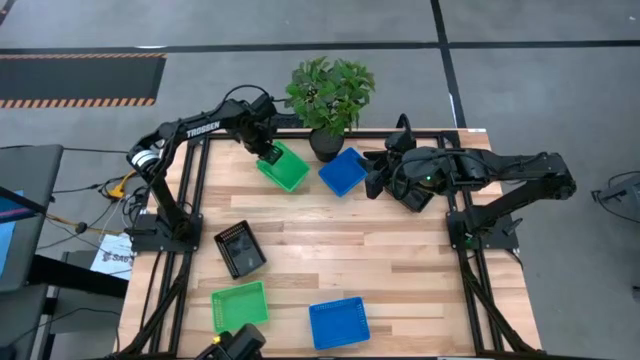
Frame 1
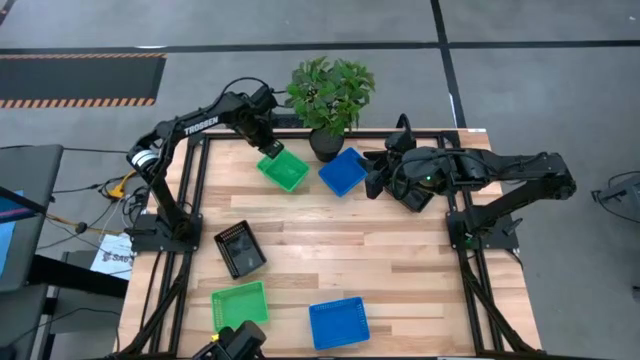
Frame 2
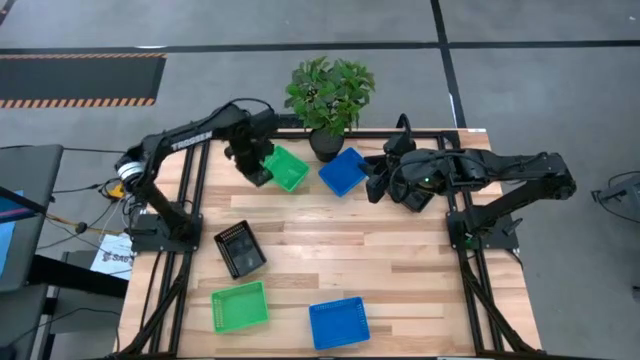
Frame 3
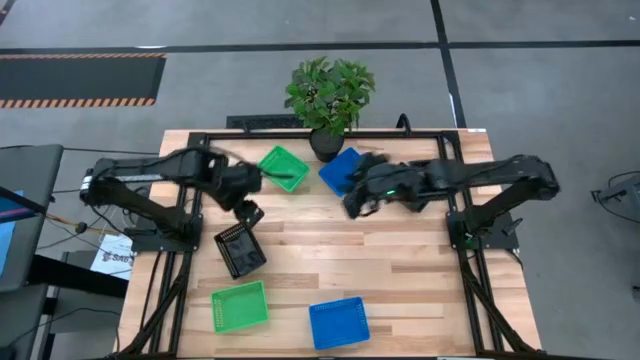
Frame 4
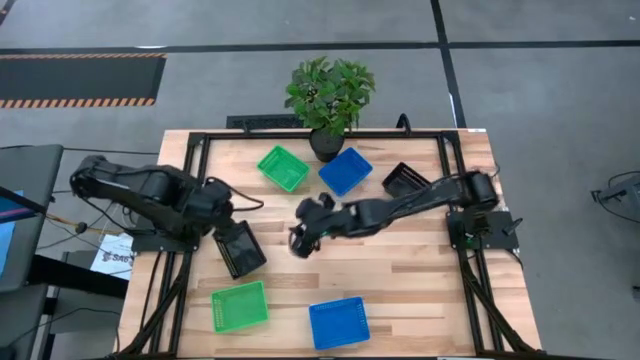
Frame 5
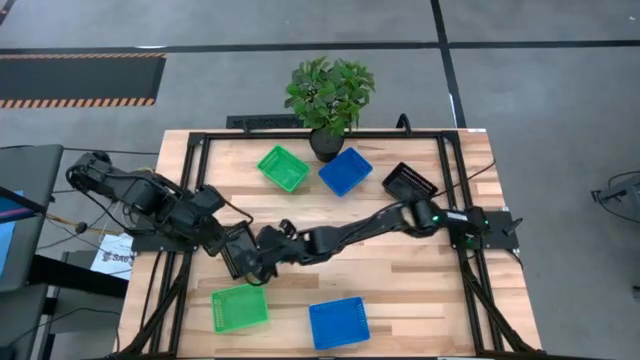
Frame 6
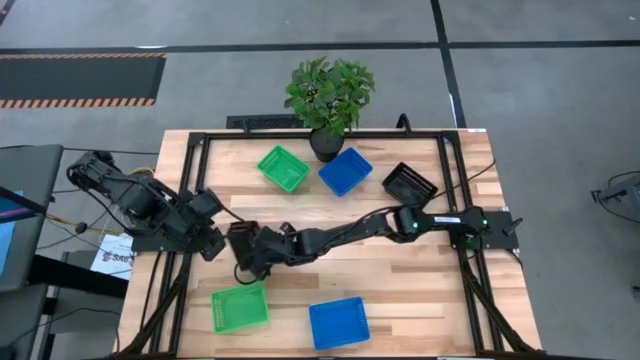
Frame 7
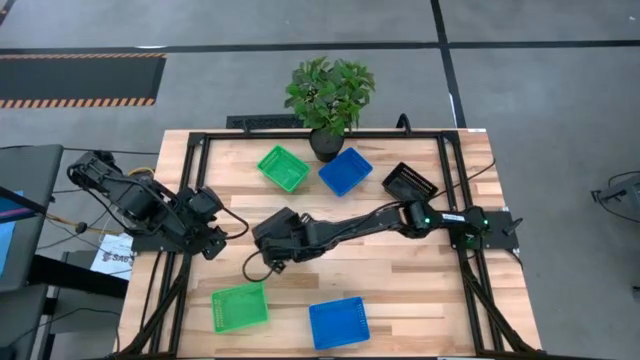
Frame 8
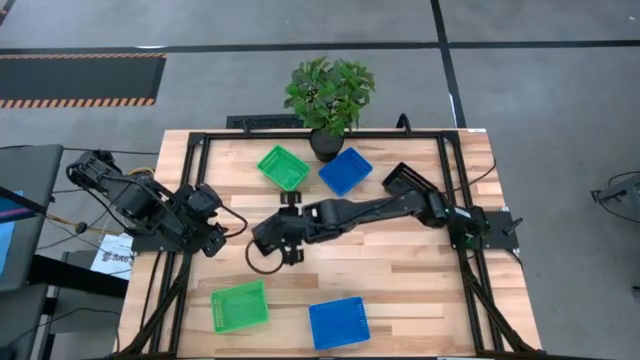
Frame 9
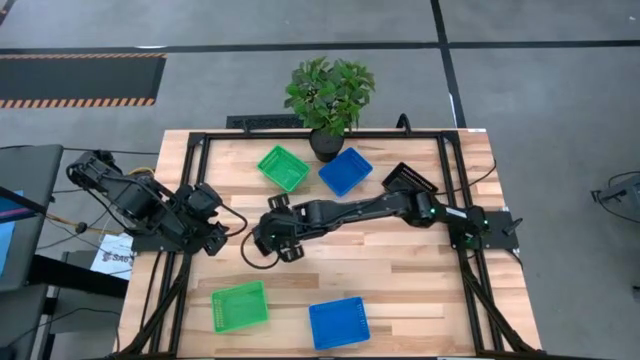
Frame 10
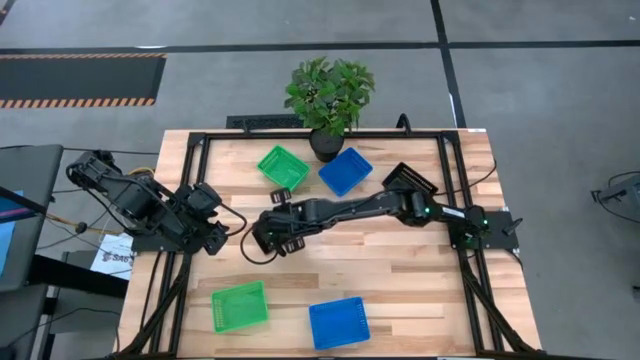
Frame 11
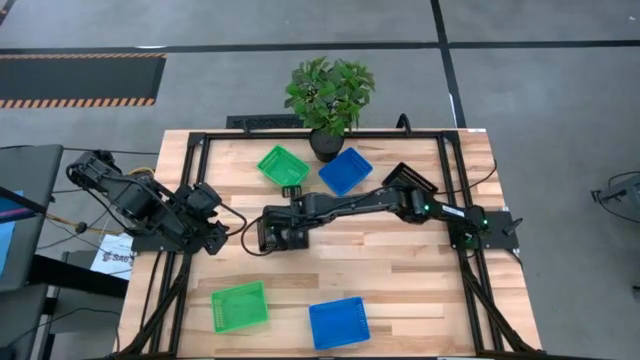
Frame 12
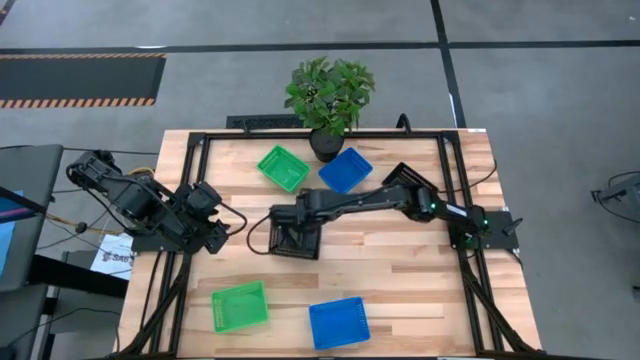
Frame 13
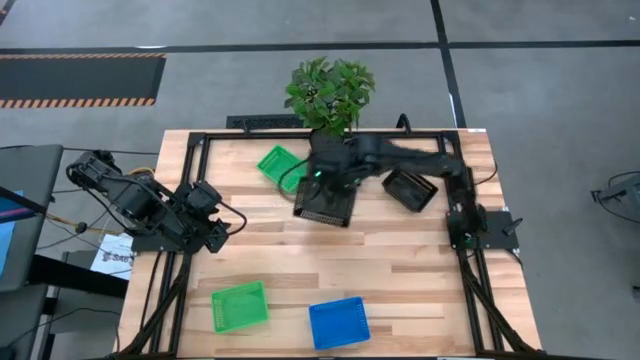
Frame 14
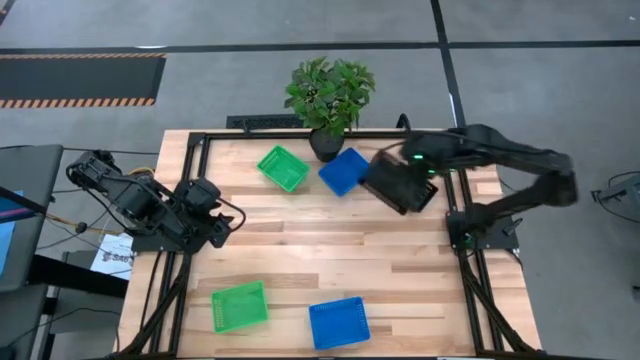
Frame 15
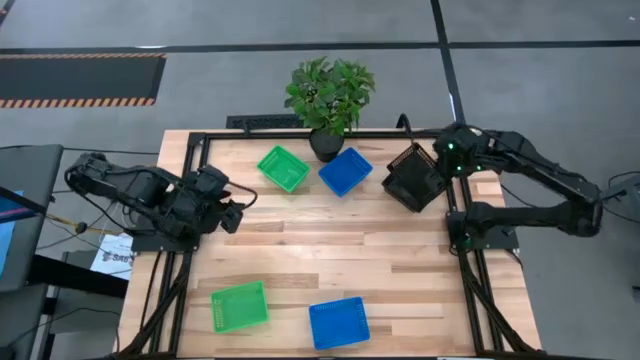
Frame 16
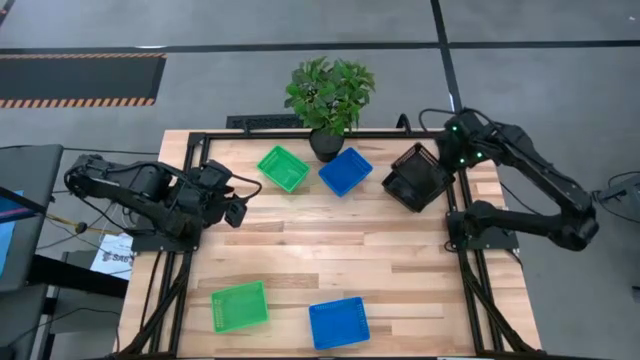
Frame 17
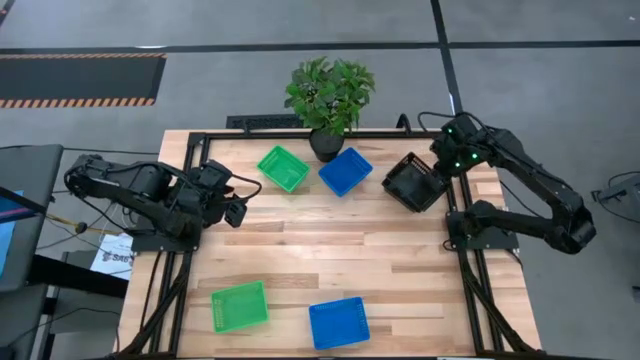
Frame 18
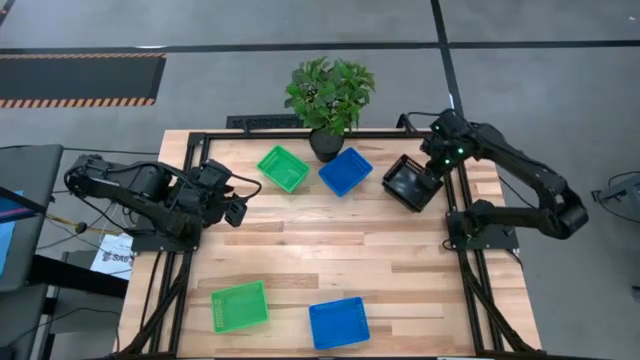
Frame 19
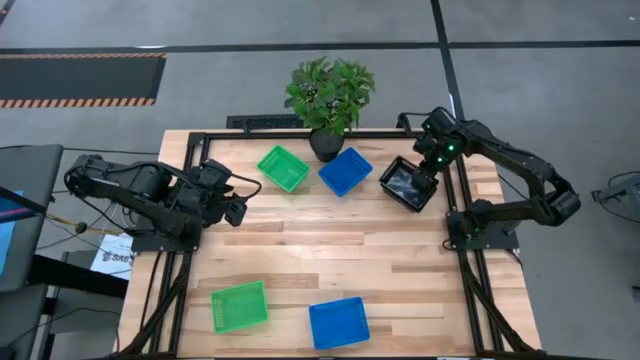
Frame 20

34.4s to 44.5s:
Stack the bottom black basket on the top black basket

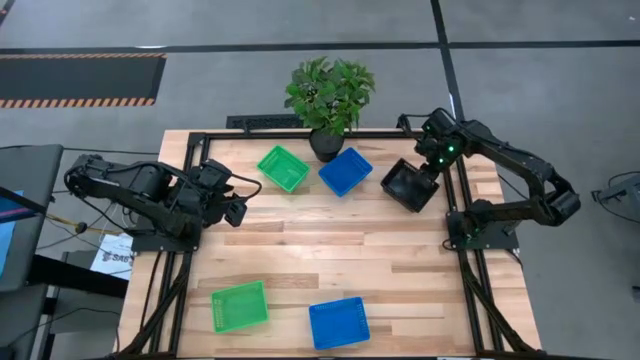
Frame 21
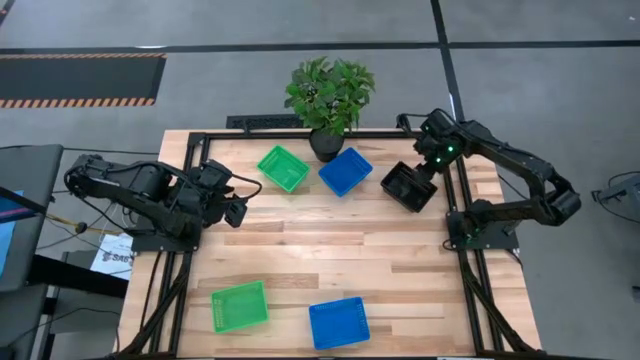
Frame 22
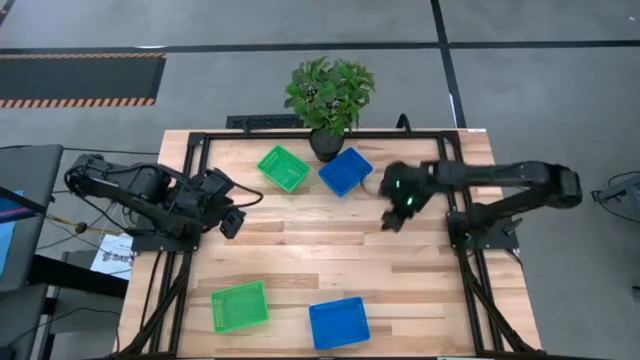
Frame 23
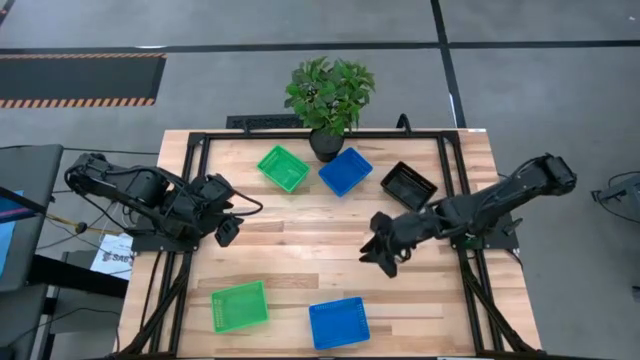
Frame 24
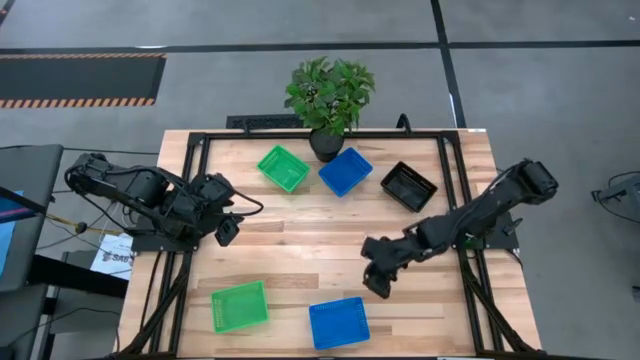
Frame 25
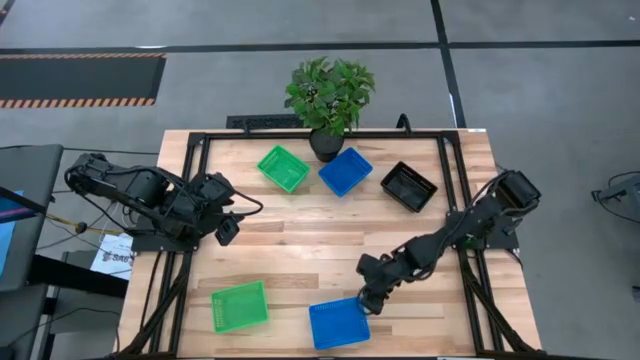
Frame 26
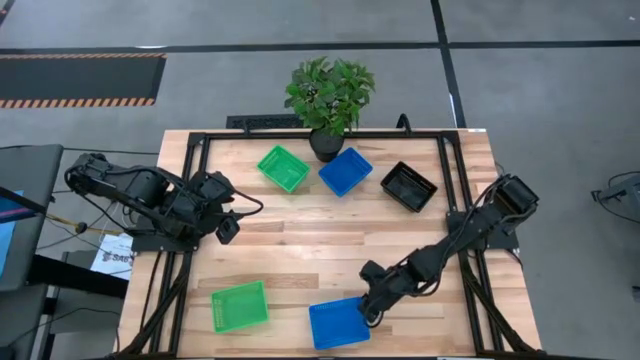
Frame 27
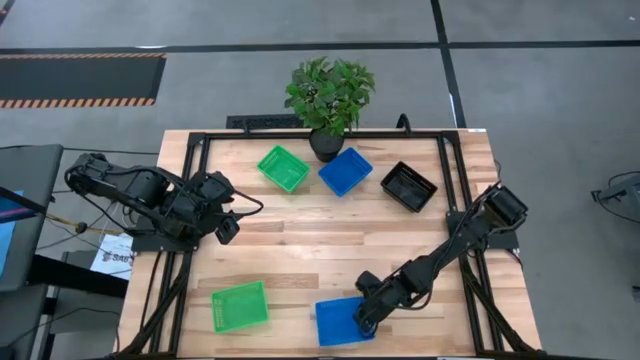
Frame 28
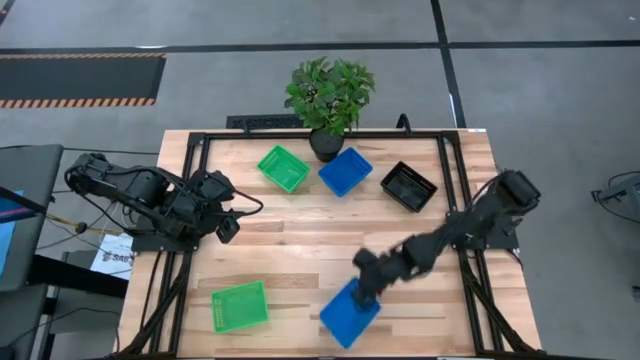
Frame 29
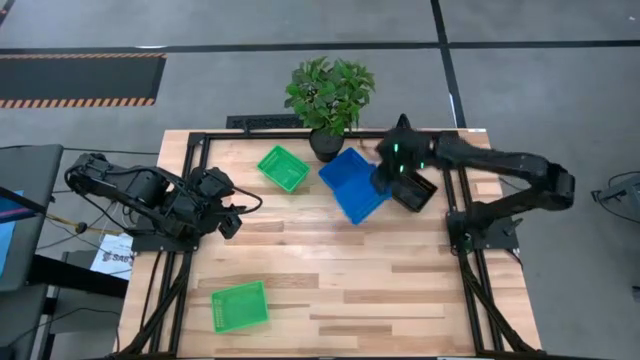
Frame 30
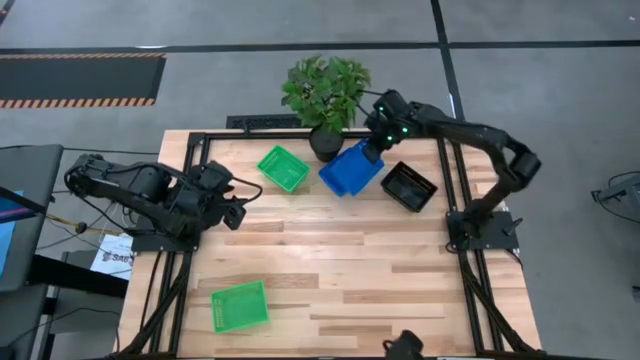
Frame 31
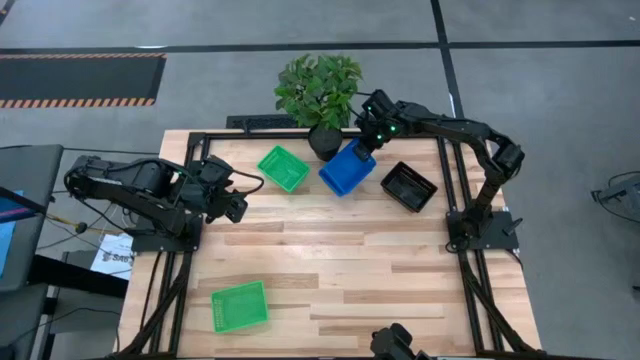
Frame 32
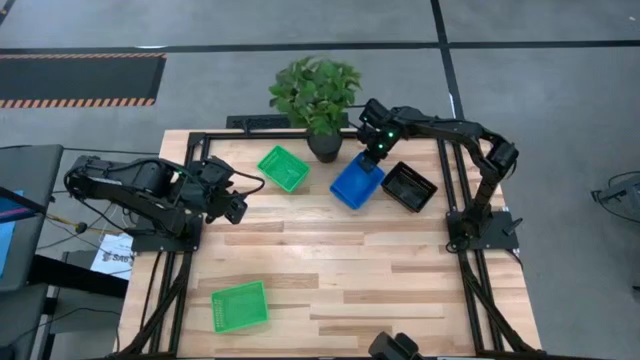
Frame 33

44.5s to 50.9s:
Stack the bottom blue basket on the top blue basket

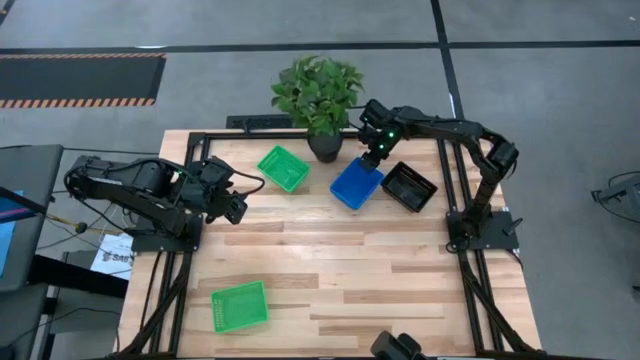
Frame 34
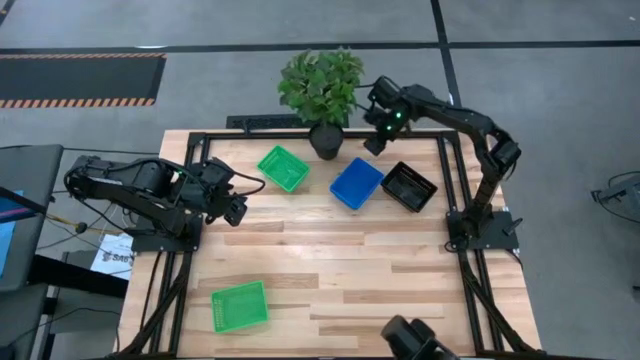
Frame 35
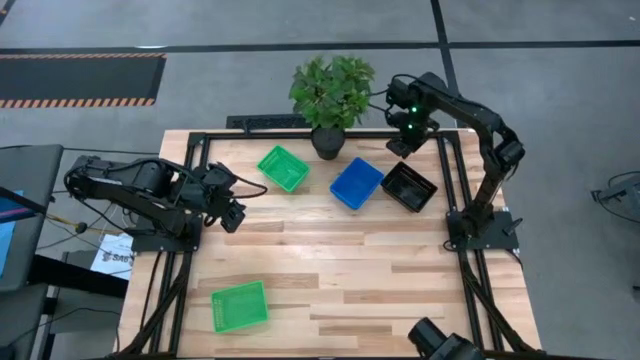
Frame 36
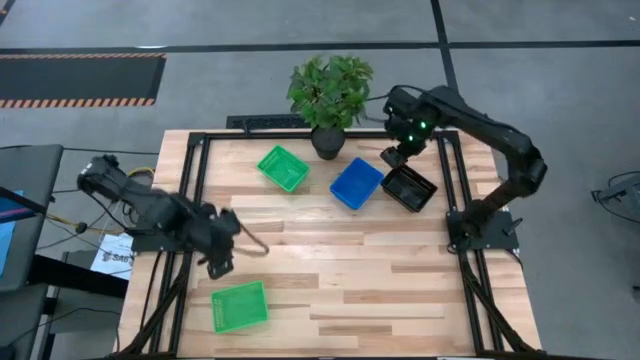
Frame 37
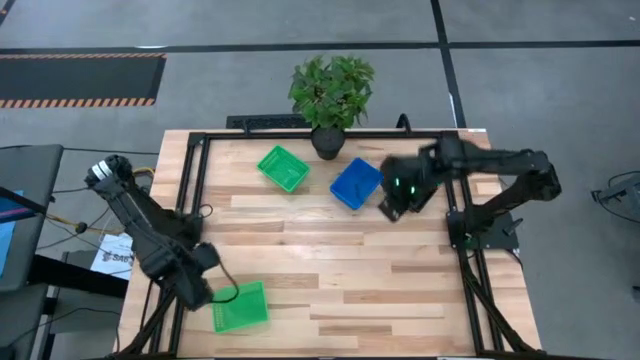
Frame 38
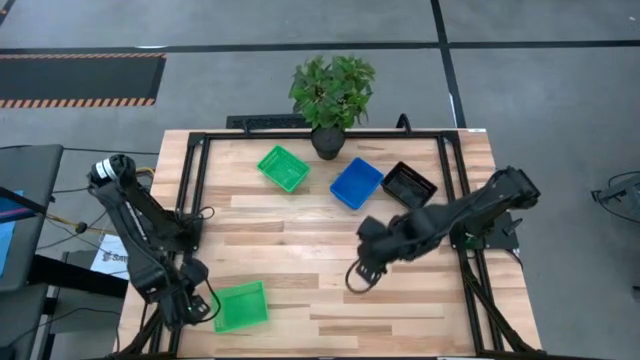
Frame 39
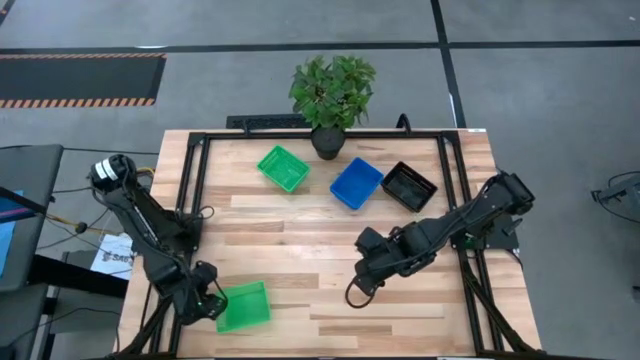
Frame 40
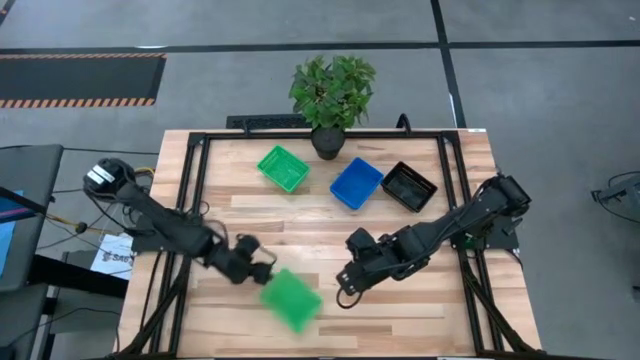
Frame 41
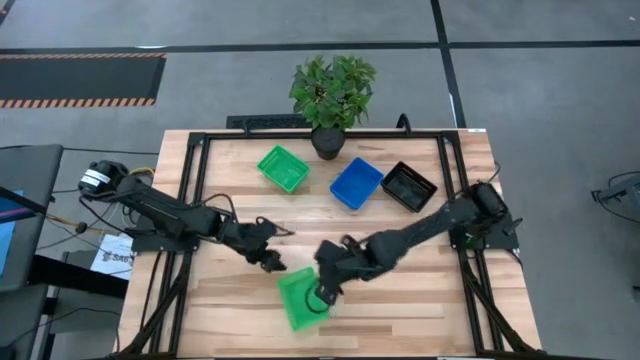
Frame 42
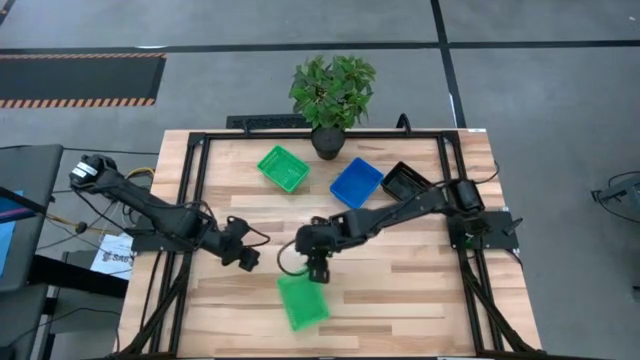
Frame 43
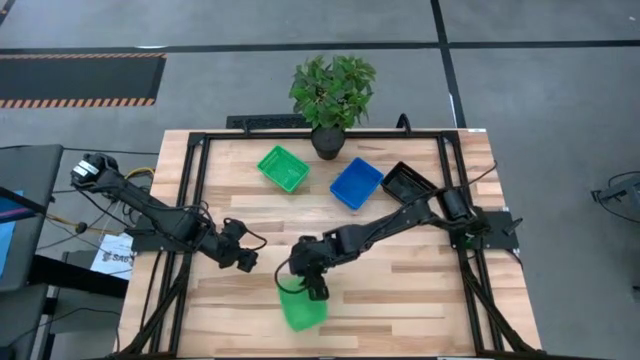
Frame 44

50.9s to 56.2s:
Stack the bottom green basket on the top green basket
